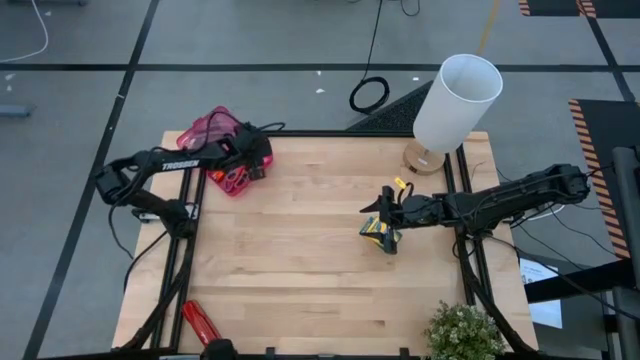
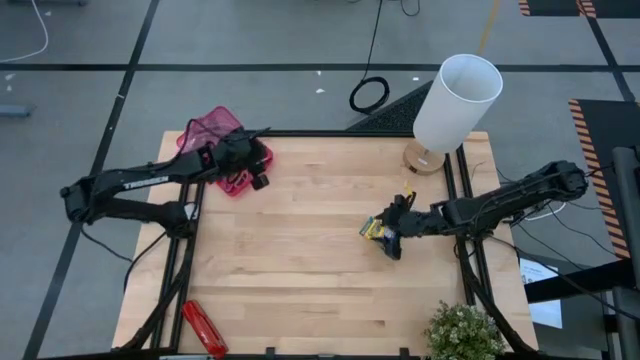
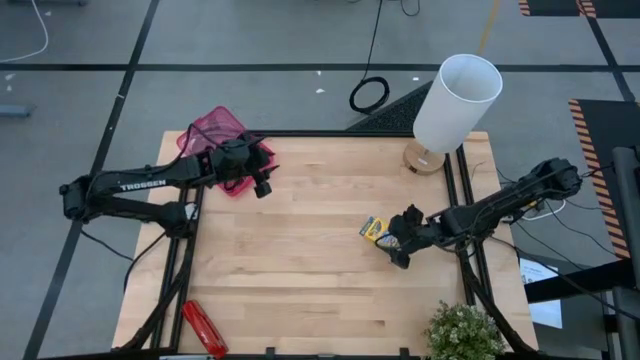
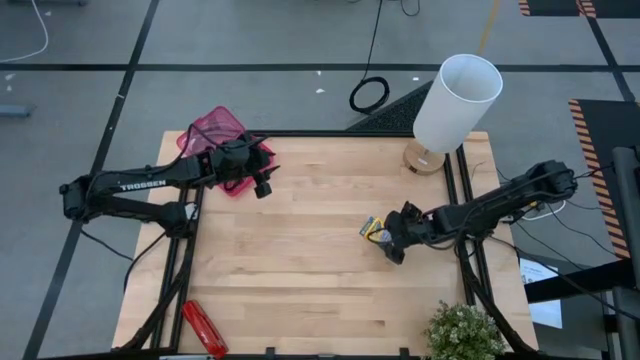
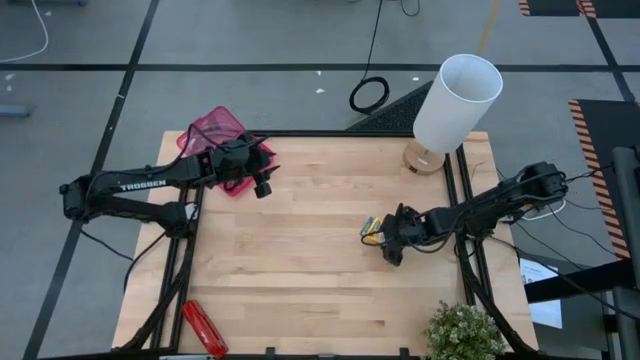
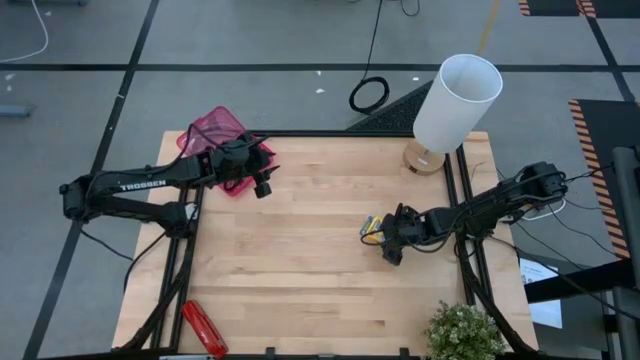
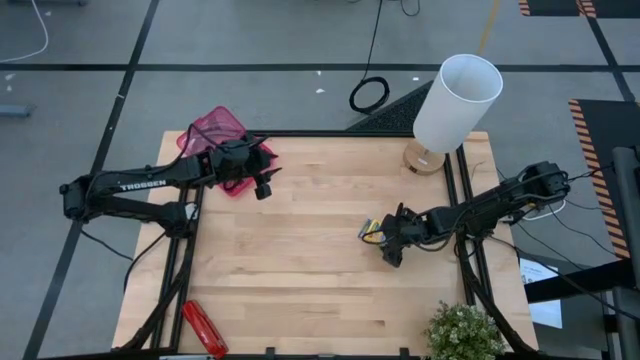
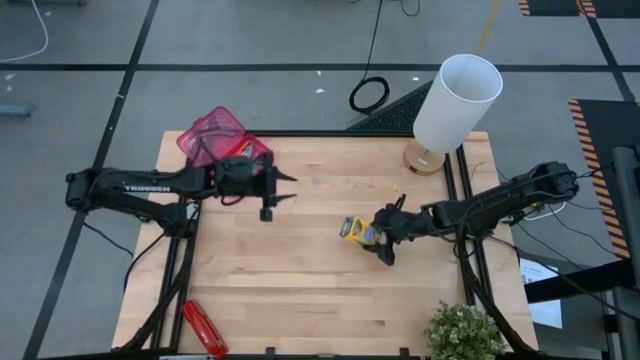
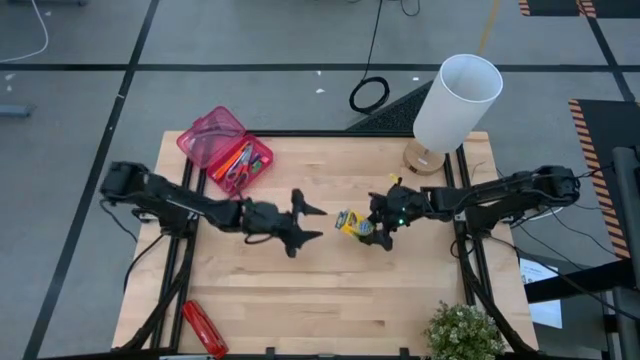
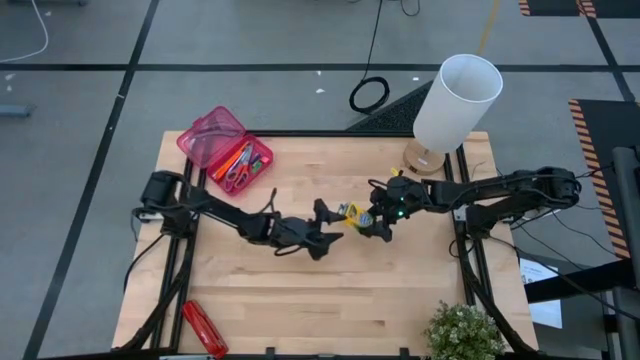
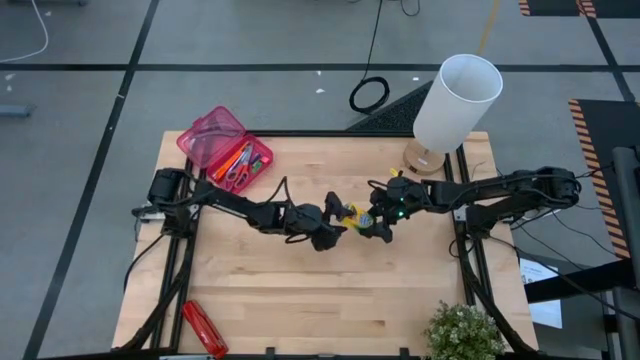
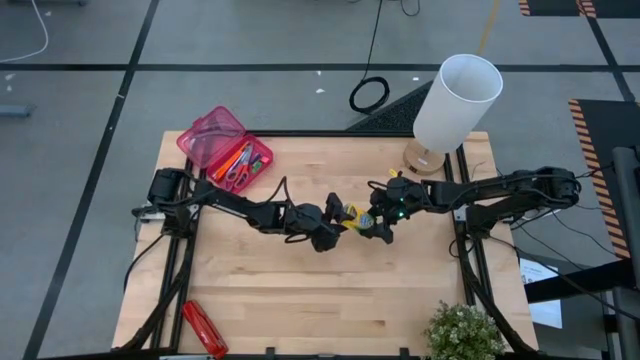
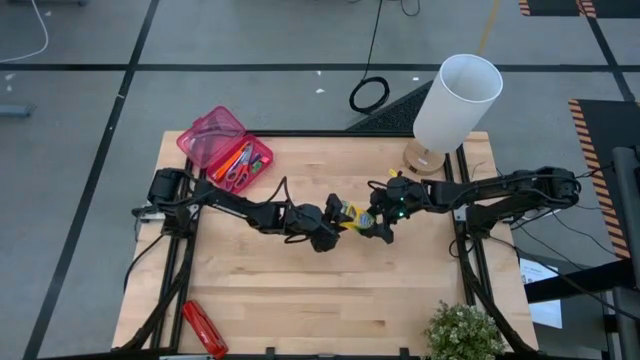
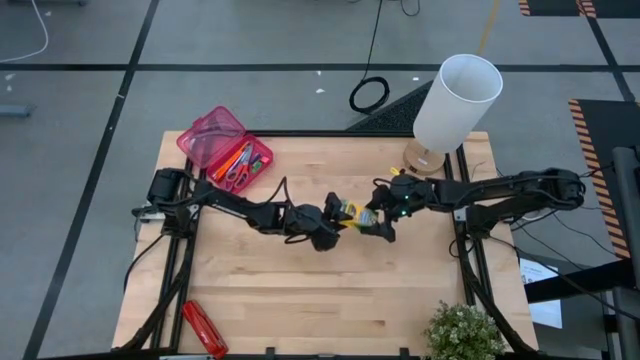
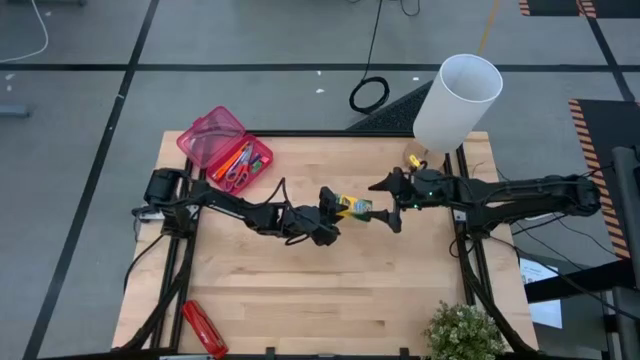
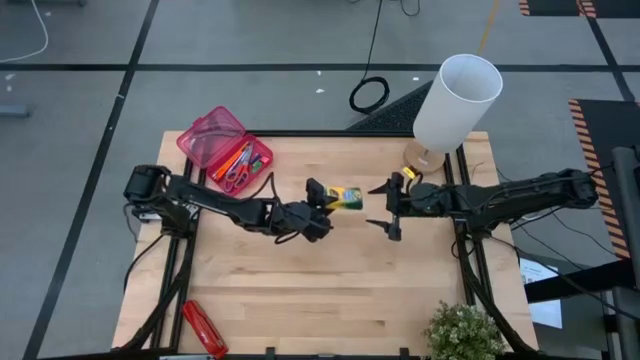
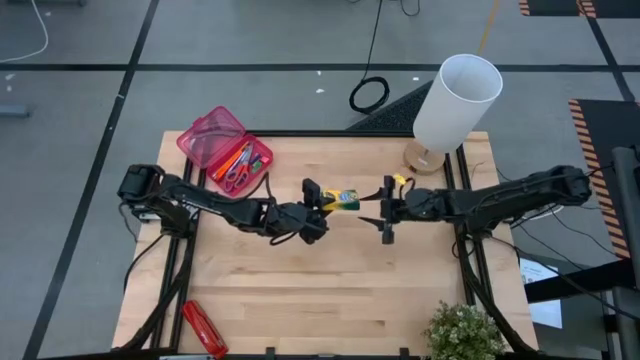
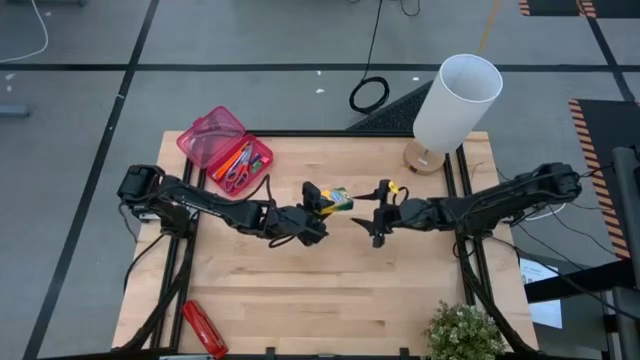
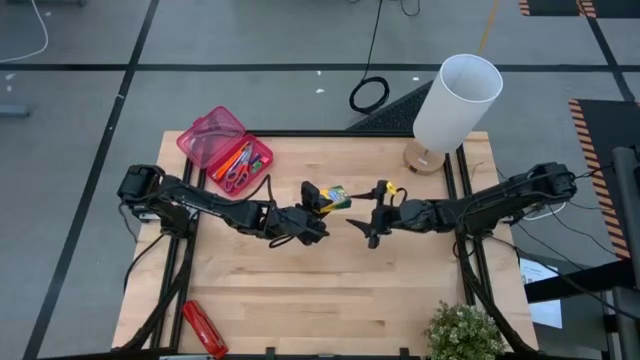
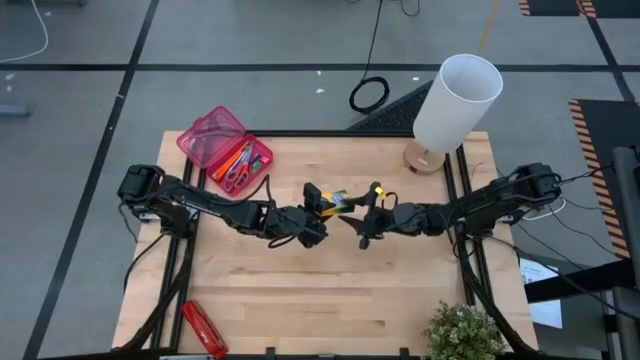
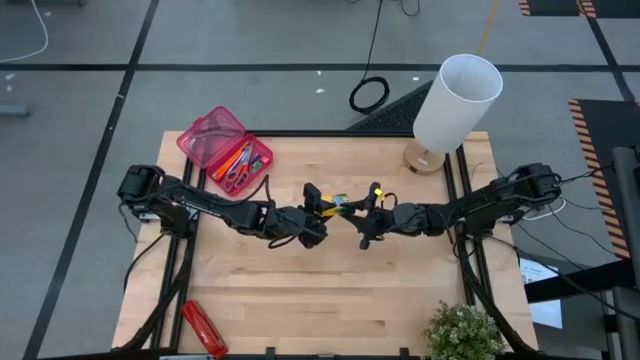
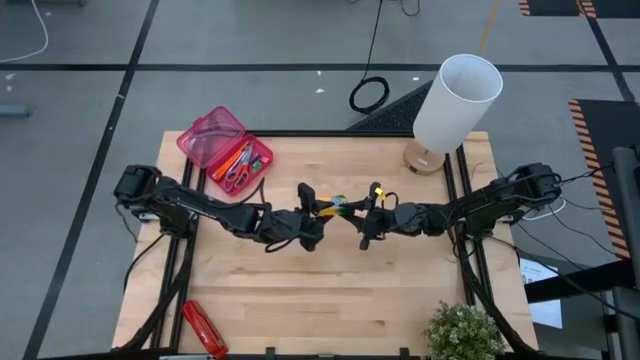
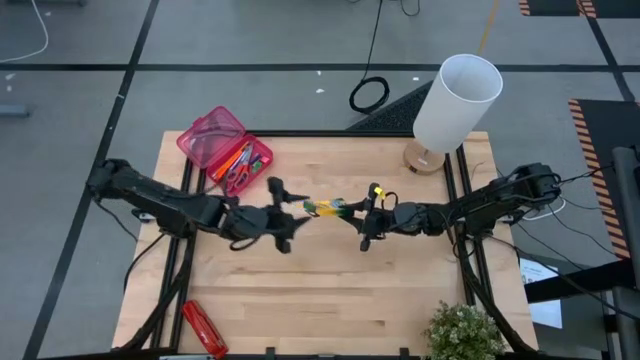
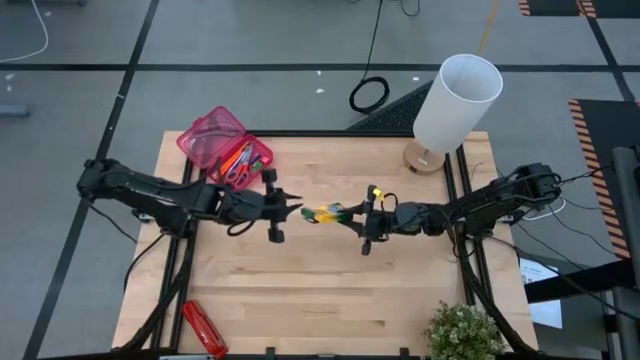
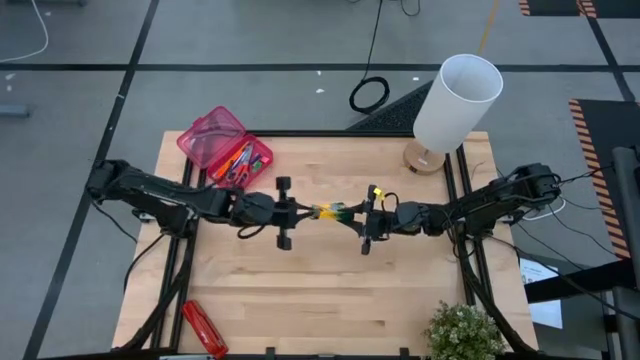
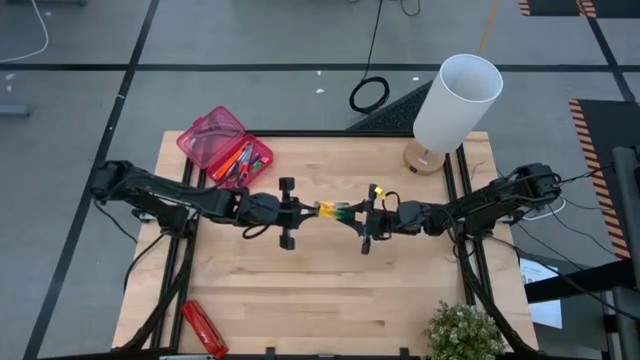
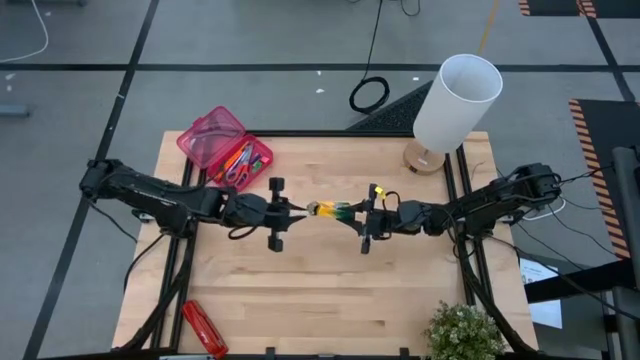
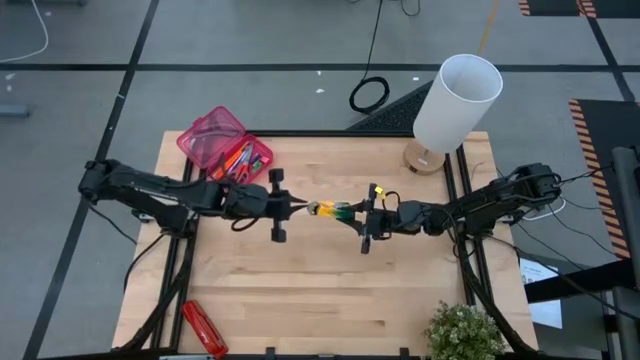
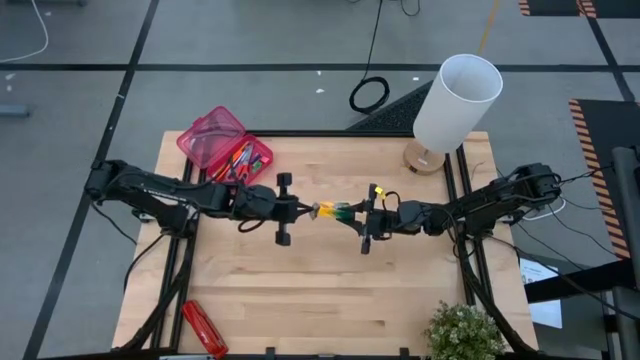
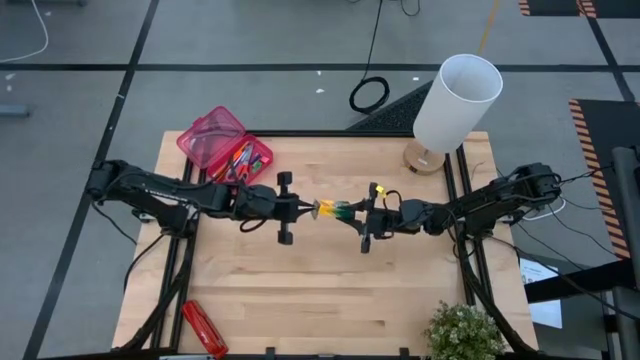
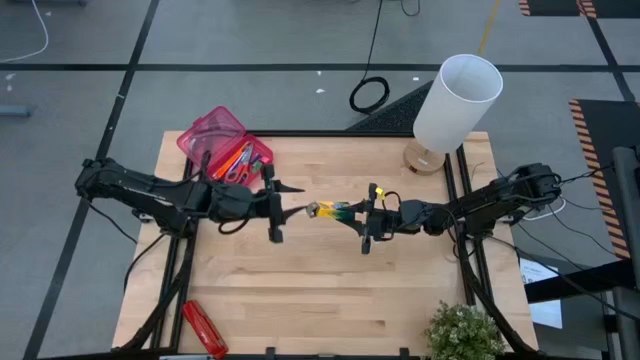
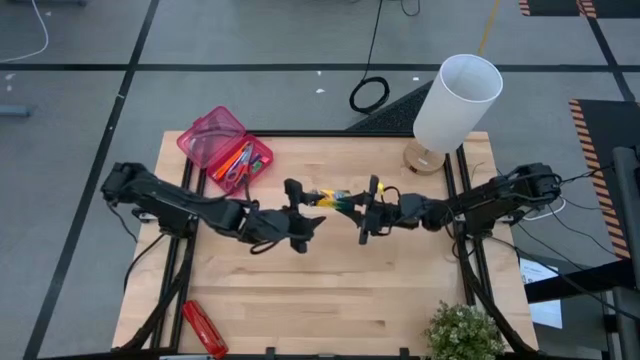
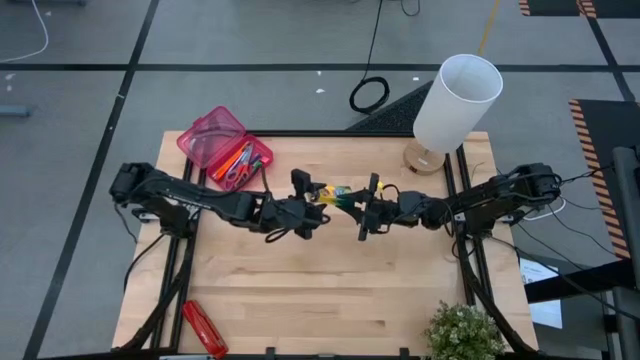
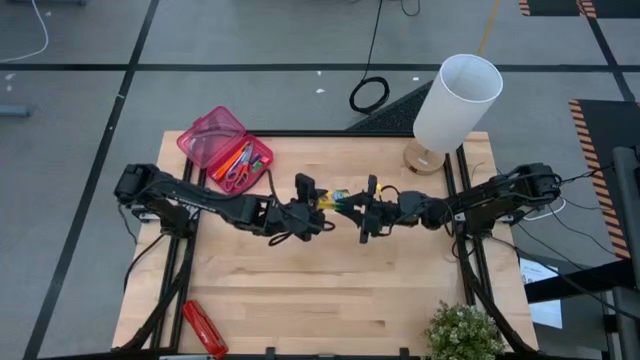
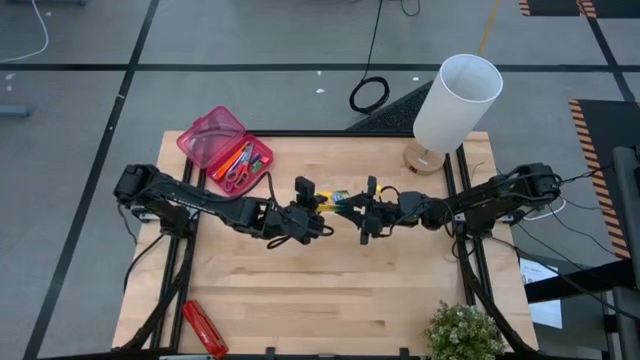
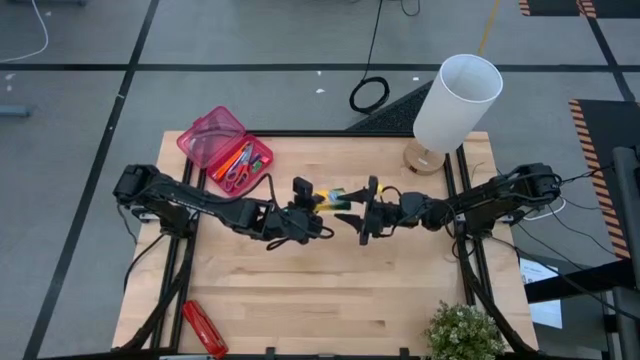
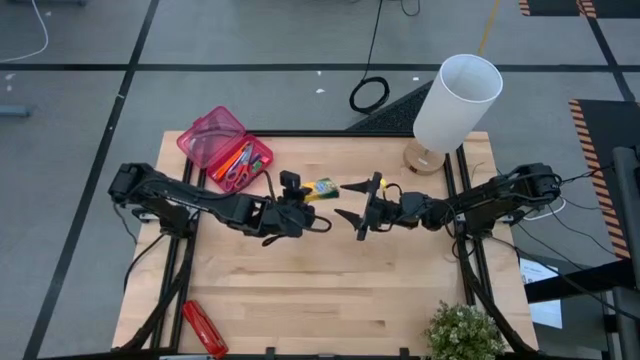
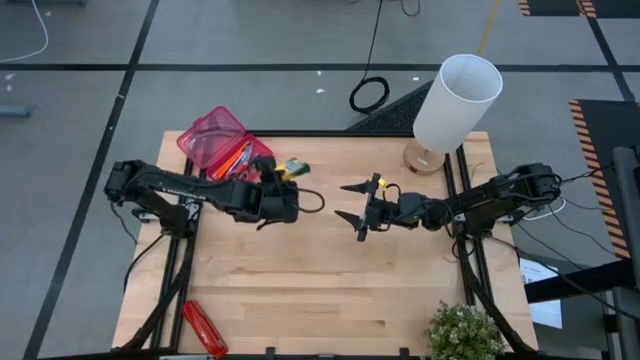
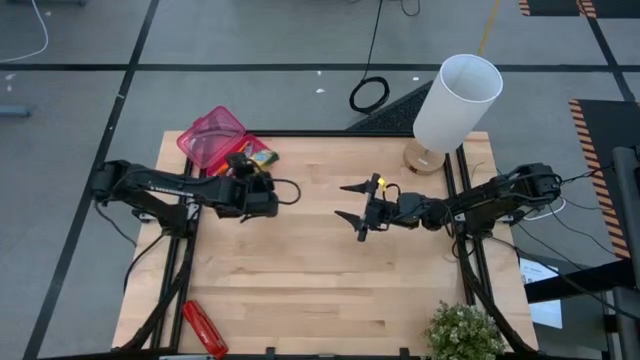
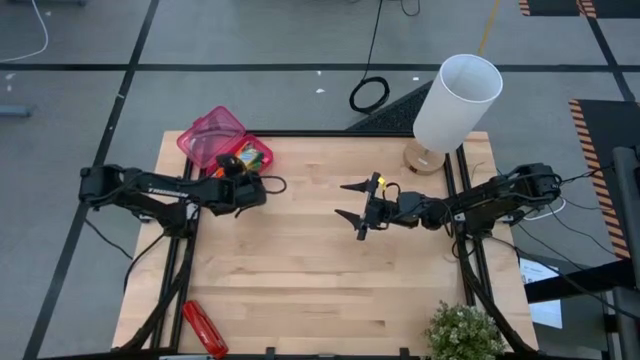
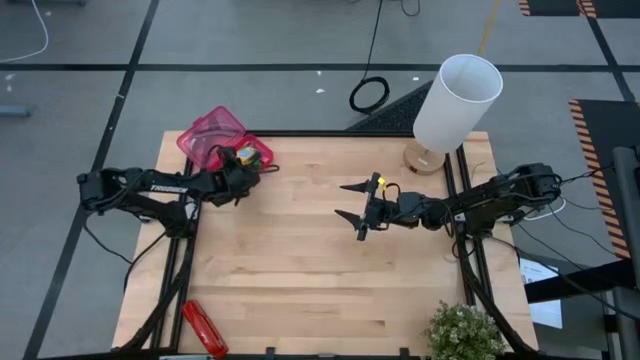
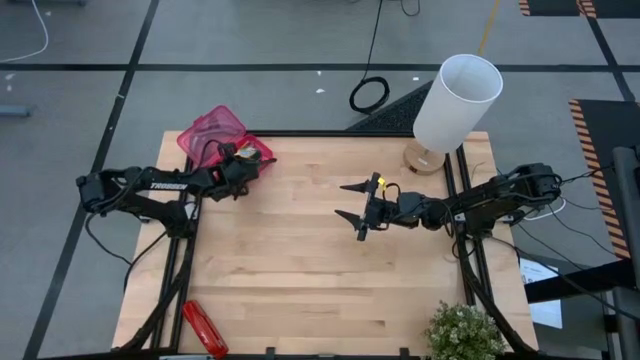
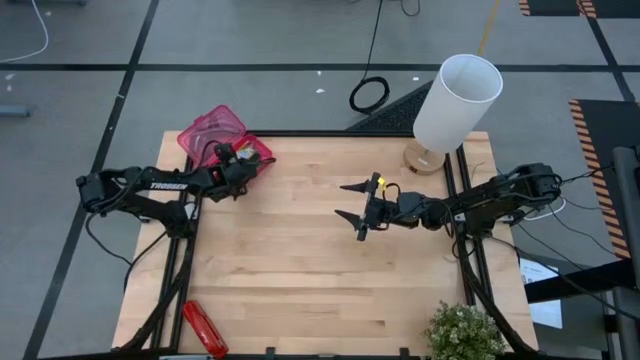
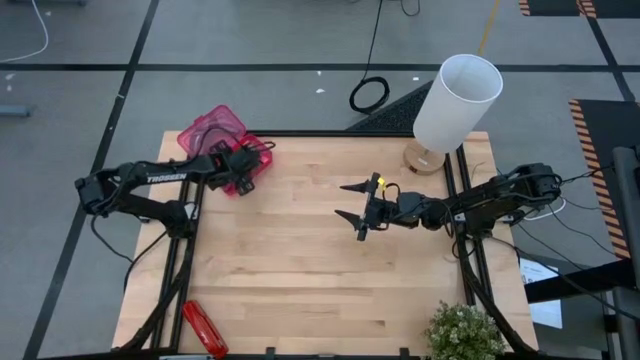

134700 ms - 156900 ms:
Task: Pack school essentials
Put the crayon box into the pink supply box
